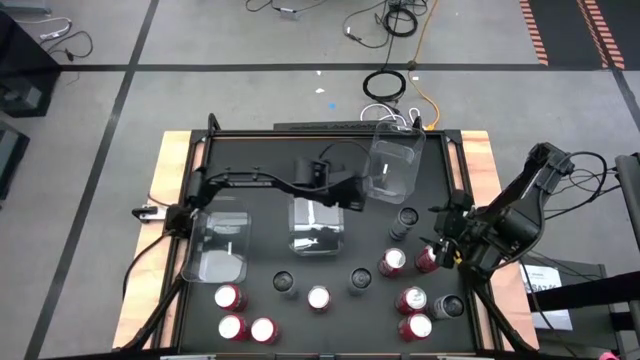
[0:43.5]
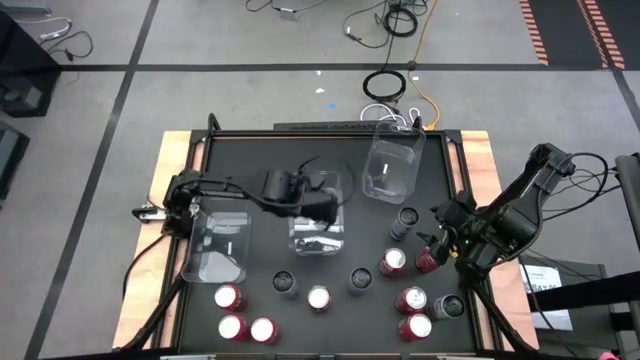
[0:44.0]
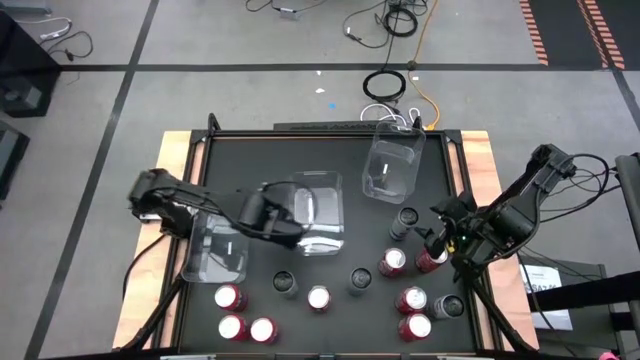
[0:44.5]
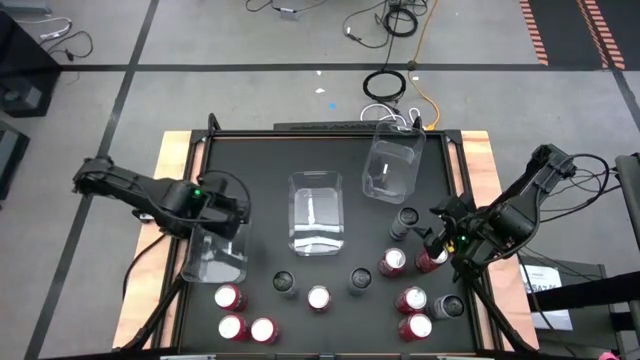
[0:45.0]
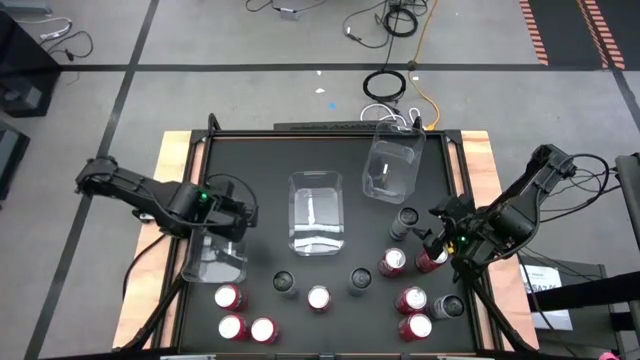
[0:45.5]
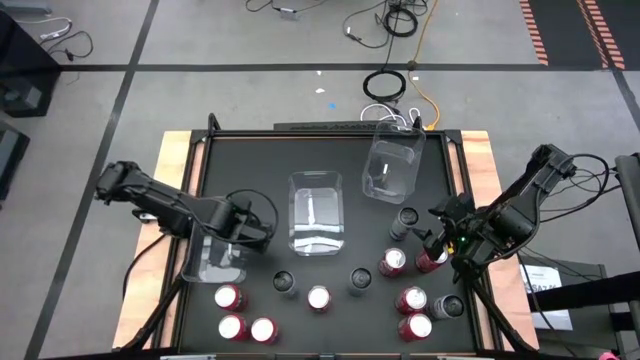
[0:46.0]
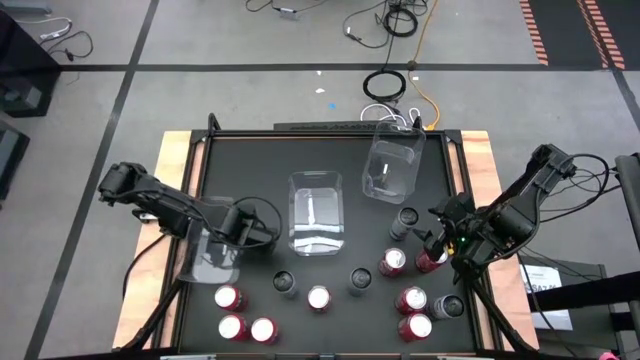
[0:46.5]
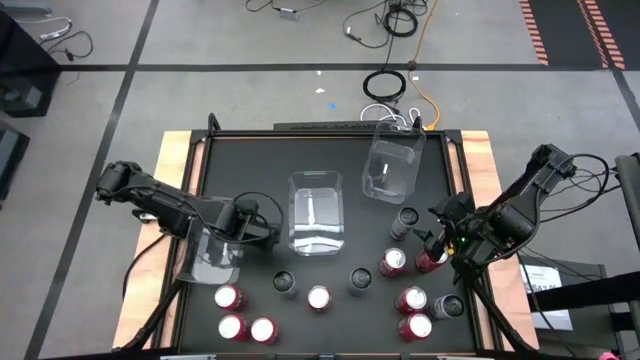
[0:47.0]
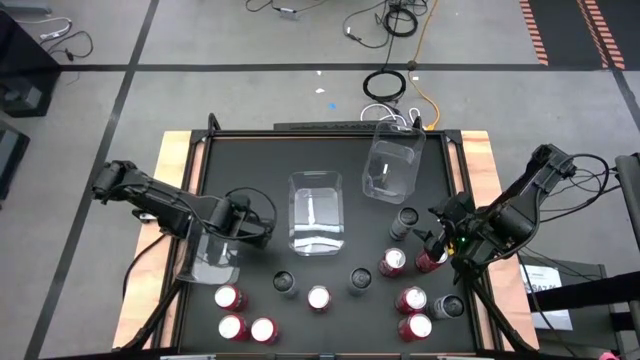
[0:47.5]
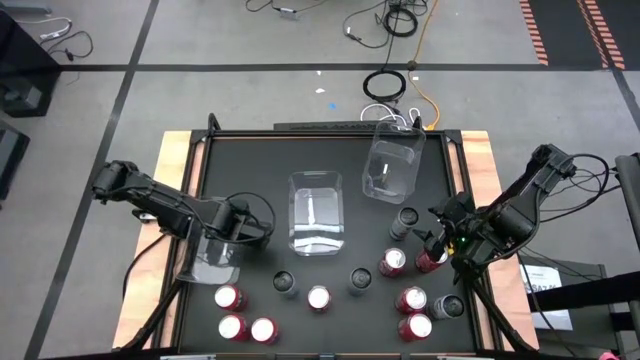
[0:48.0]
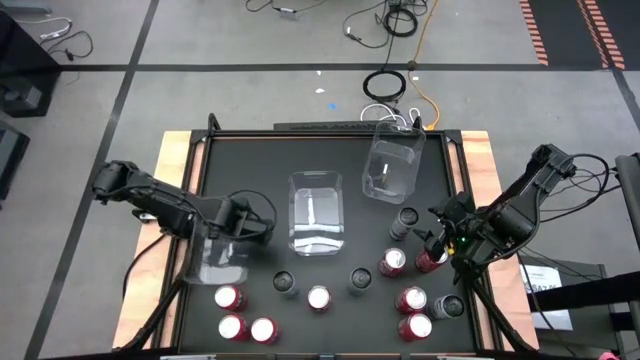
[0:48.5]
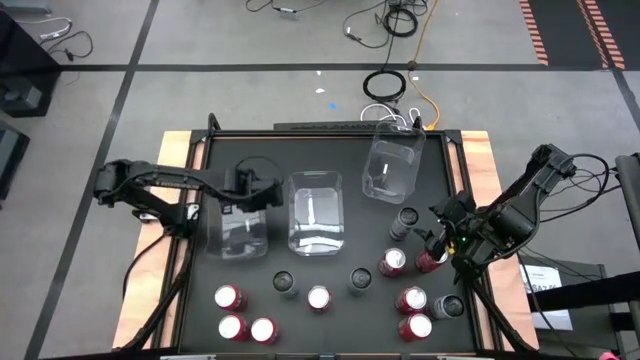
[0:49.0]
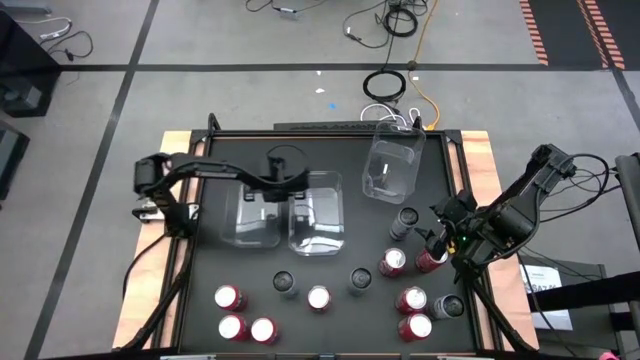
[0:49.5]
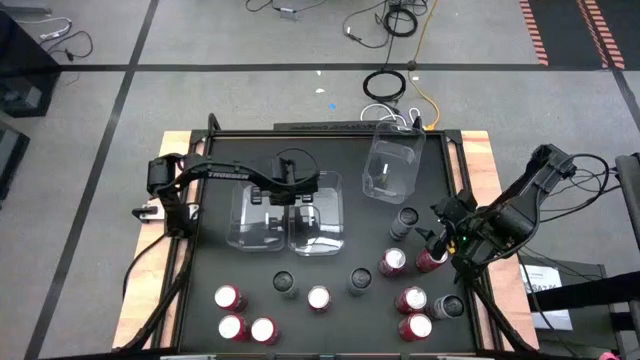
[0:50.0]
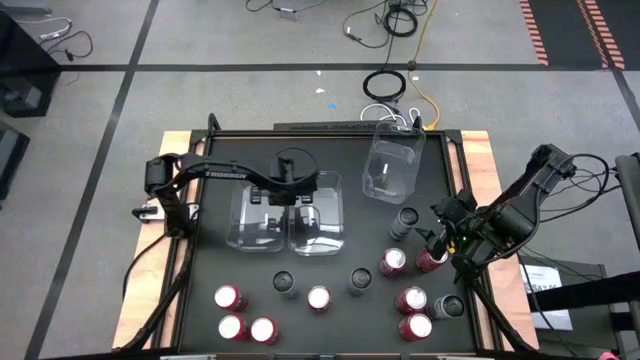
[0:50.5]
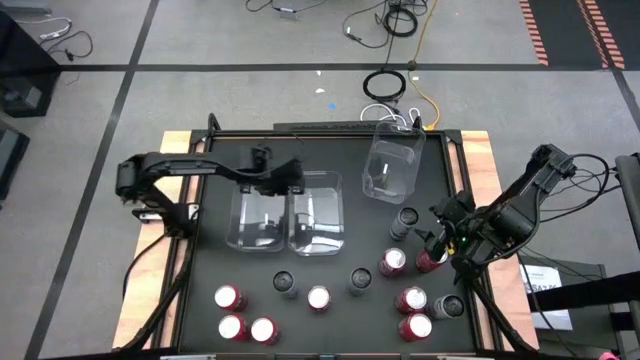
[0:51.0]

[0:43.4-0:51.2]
Task: Sort soda cans
Adjust the left transparent bin

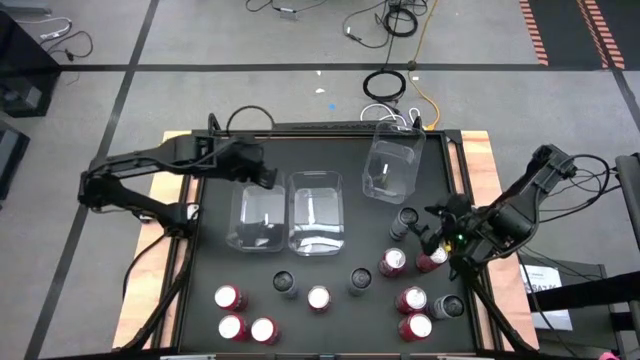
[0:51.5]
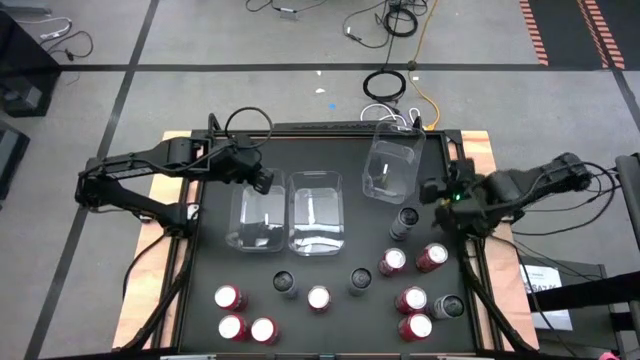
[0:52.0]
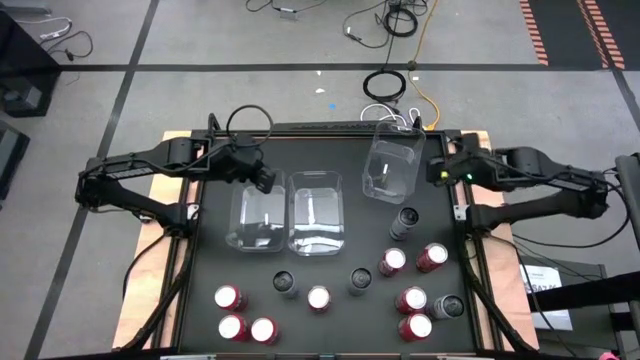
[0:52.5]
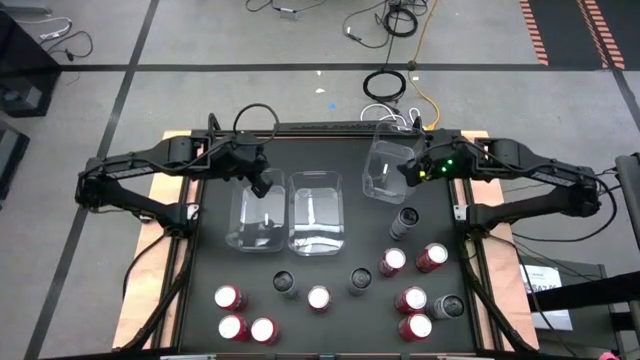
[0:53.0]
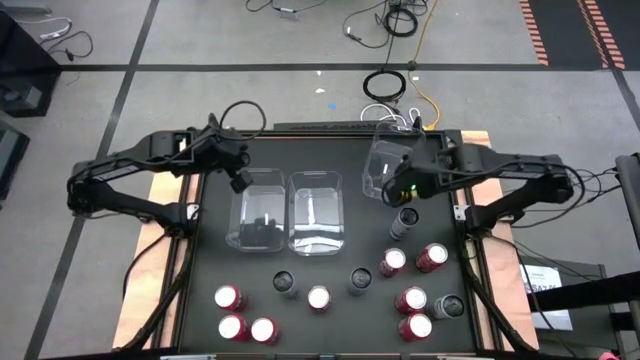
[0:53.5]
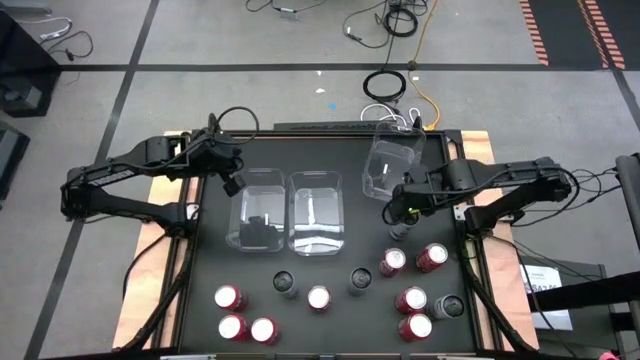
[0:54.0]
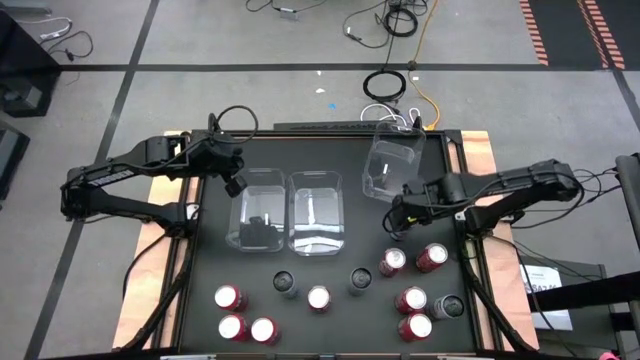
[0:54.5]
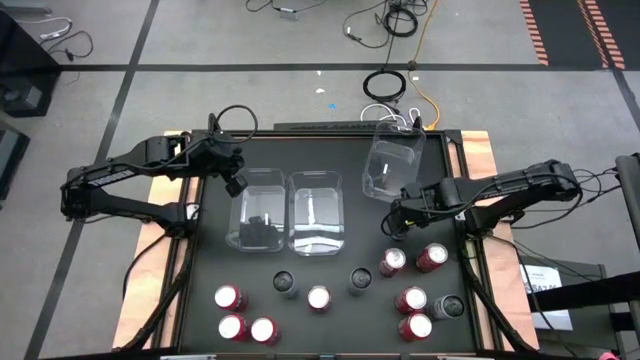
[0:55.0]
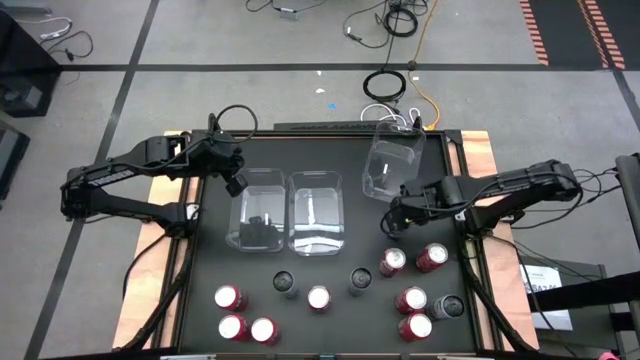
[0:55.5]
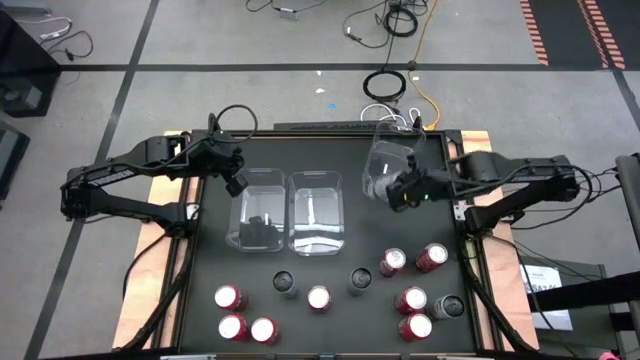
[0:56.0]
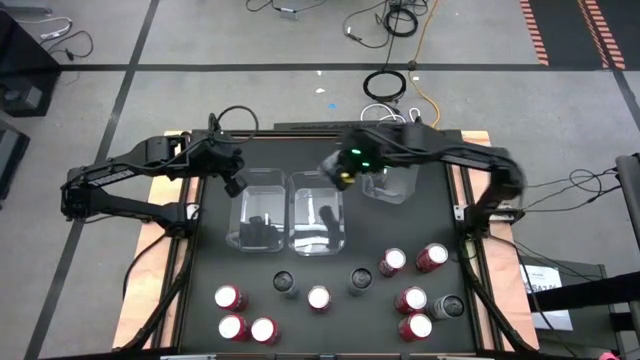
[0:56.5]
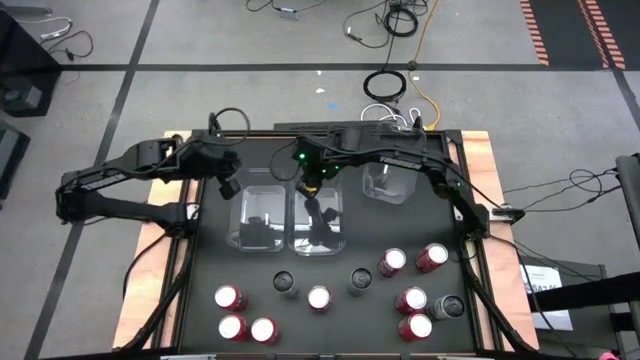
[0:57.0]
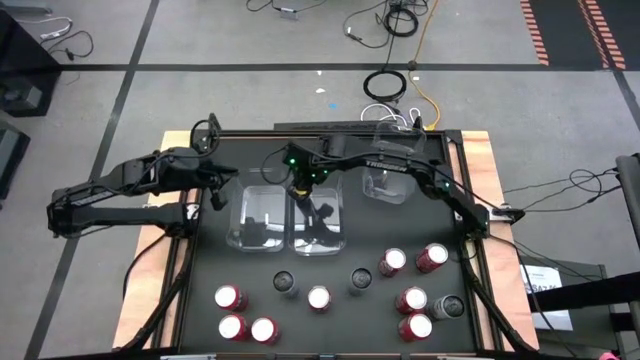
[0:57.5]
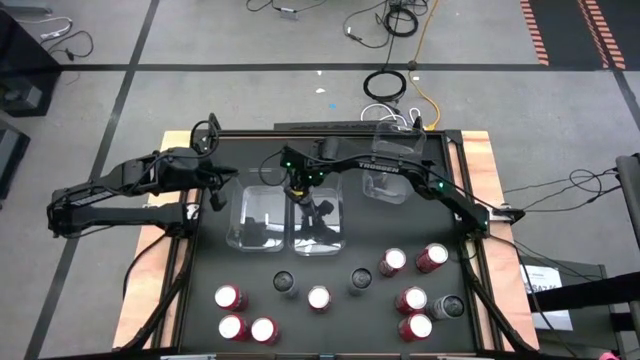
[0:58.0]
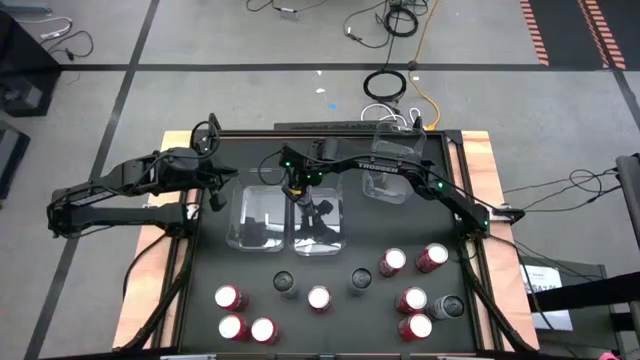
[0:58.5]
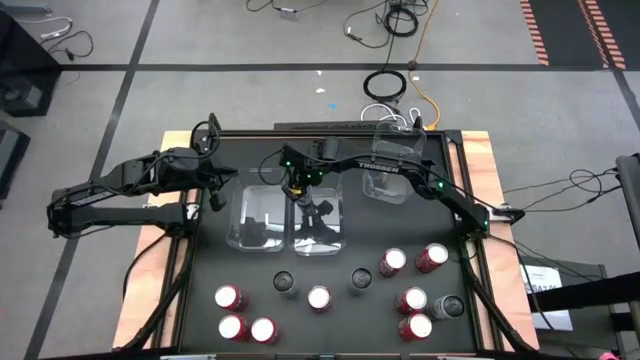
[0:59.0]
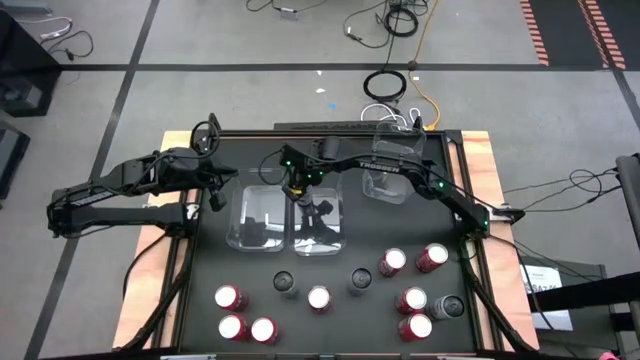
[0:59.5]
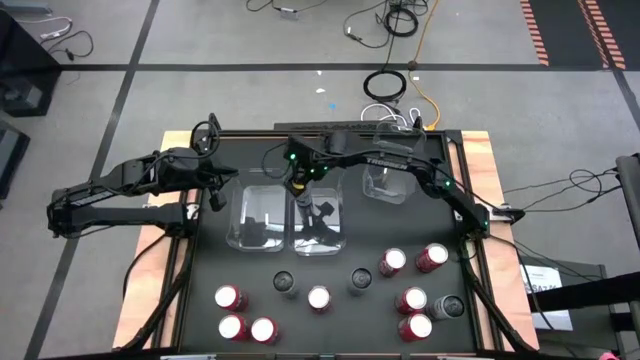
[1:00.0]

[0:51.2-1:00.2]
Put the top right white soda can into the middle transparent bin

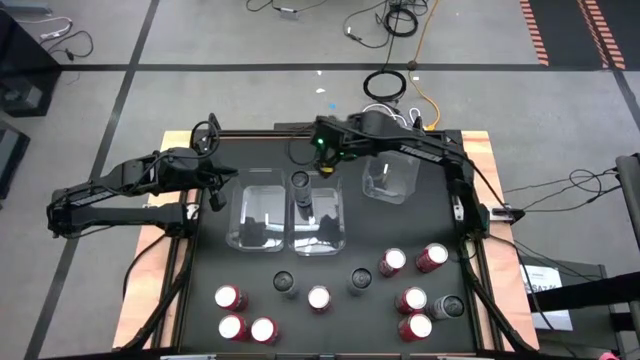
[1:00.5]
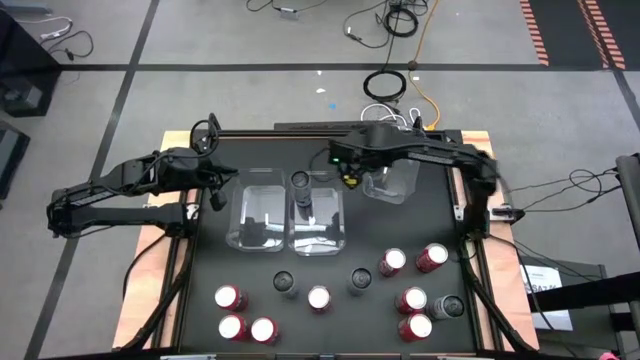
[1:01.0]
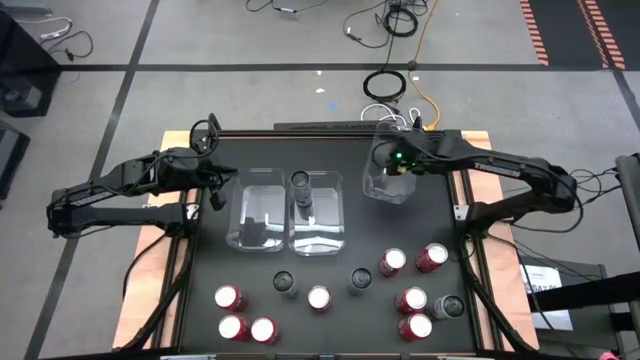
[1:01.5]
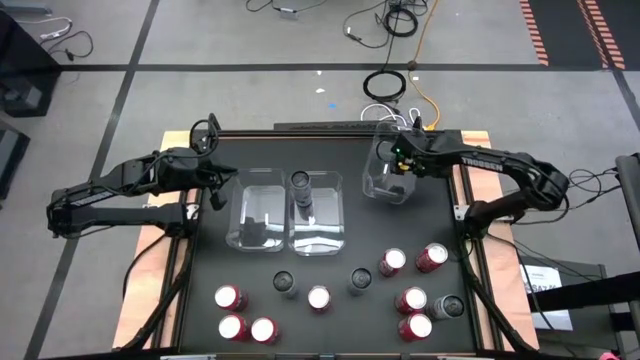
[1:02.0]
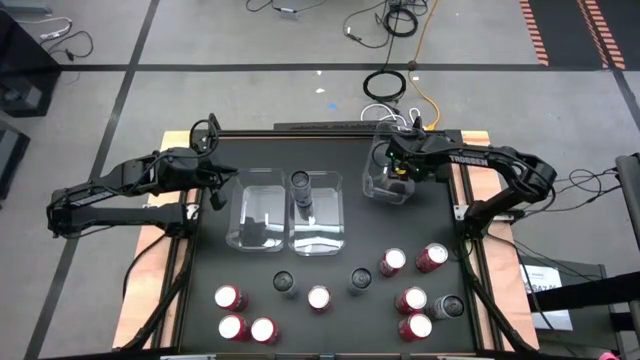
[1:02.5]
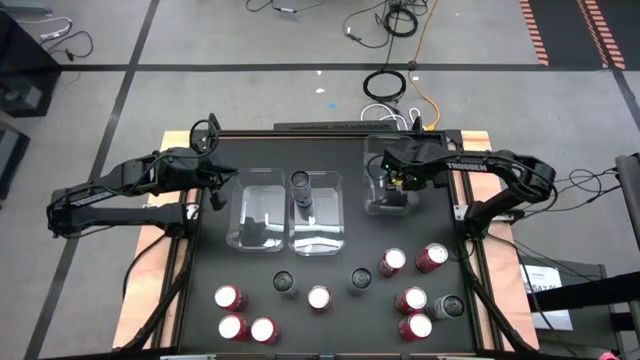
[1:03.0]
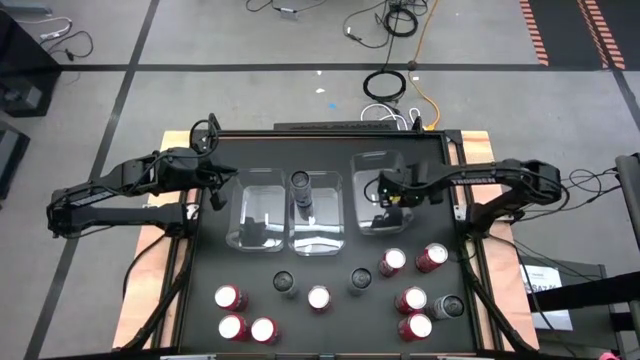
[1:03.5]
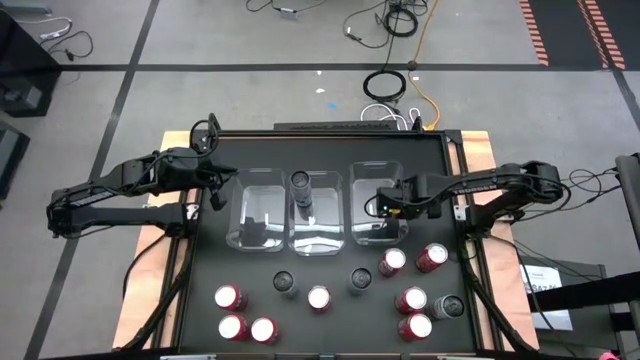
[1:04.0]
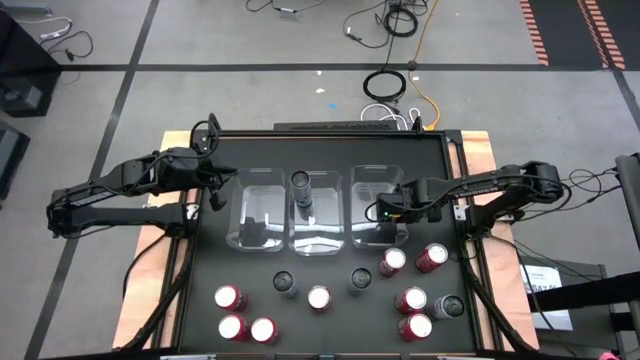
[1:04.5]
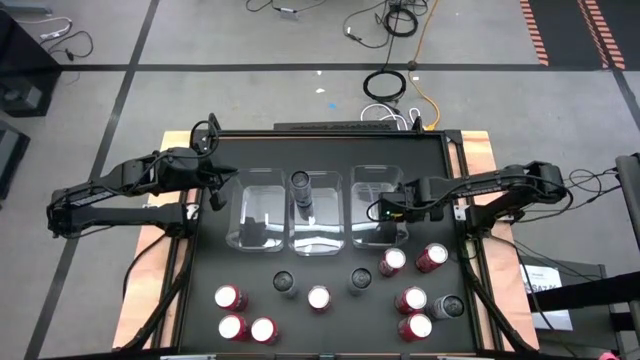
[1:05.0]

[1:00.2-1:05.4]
Adjust the right transparent bin
